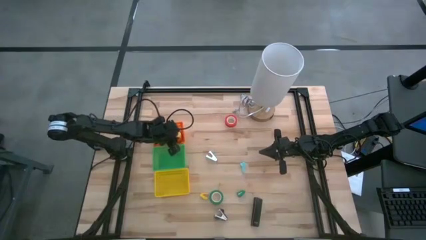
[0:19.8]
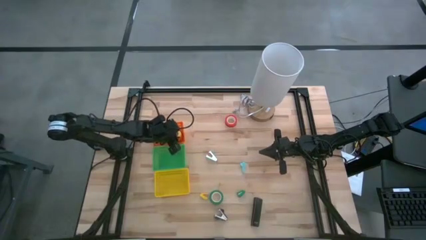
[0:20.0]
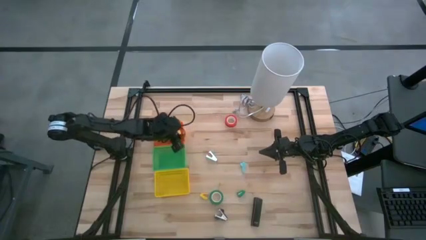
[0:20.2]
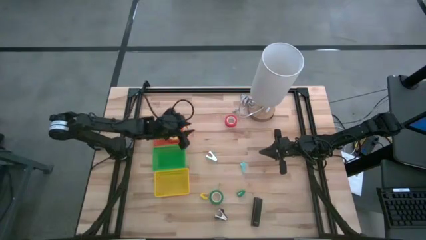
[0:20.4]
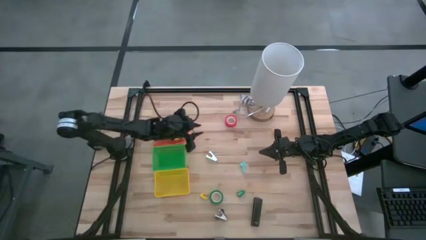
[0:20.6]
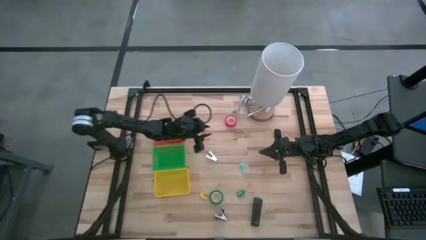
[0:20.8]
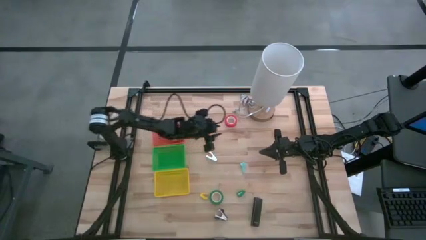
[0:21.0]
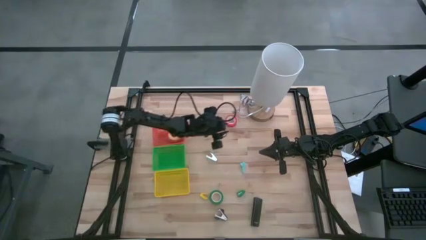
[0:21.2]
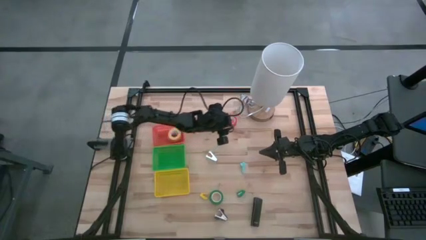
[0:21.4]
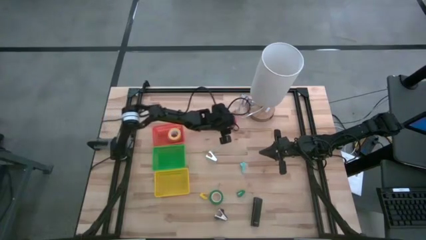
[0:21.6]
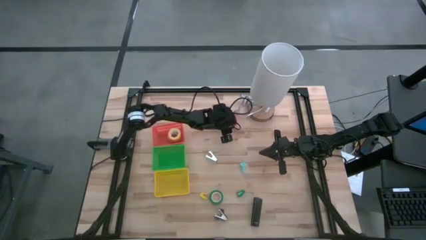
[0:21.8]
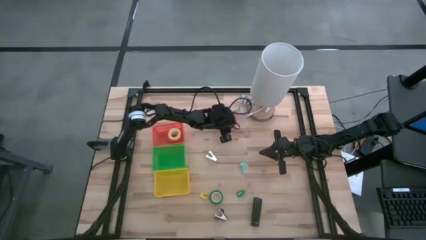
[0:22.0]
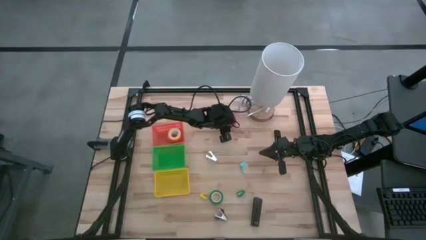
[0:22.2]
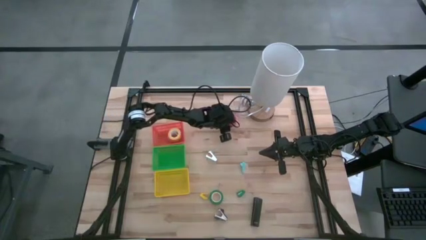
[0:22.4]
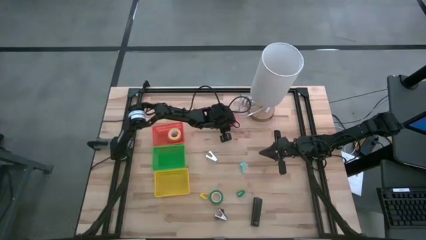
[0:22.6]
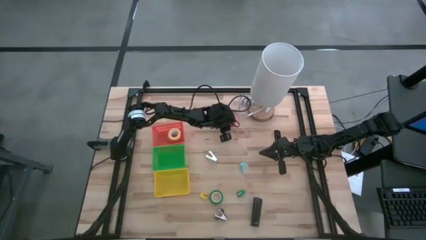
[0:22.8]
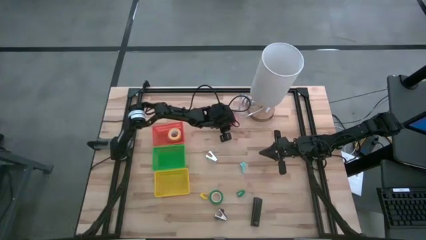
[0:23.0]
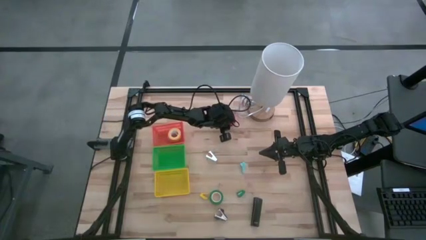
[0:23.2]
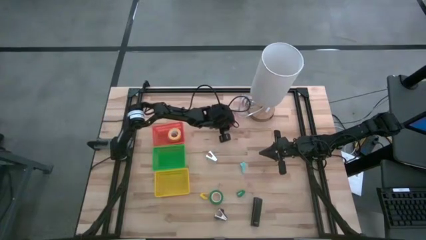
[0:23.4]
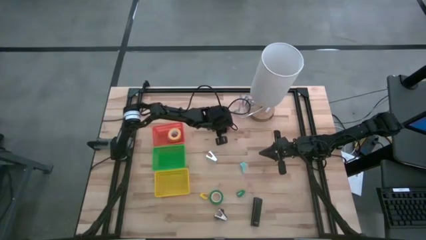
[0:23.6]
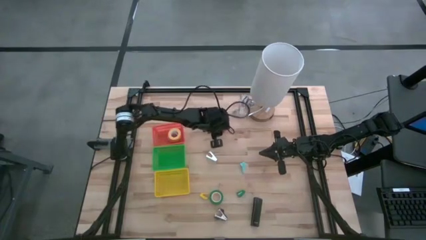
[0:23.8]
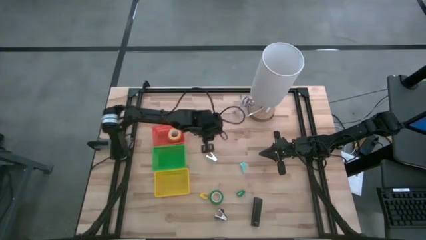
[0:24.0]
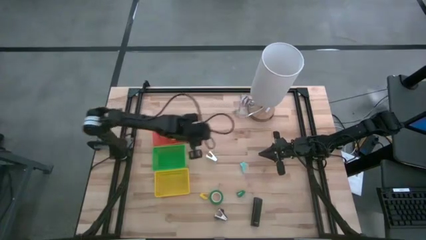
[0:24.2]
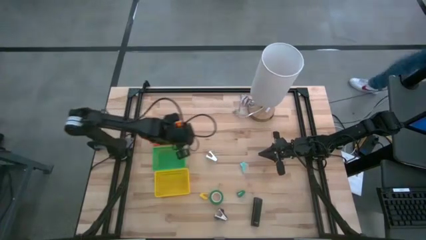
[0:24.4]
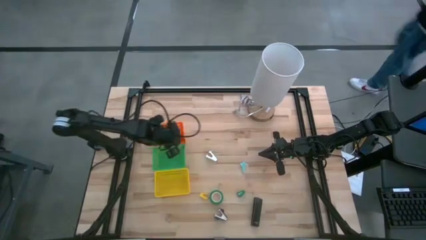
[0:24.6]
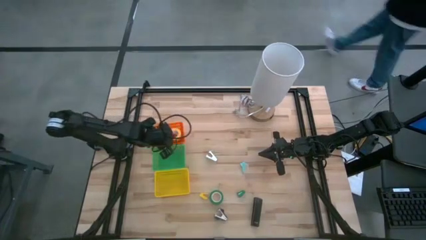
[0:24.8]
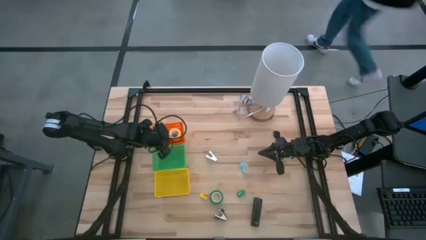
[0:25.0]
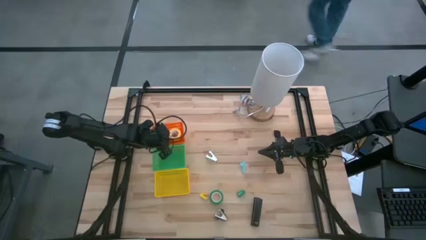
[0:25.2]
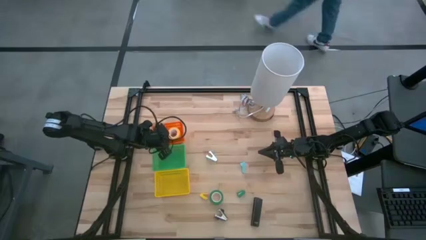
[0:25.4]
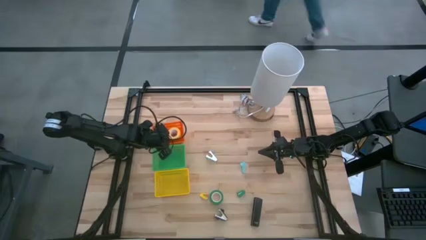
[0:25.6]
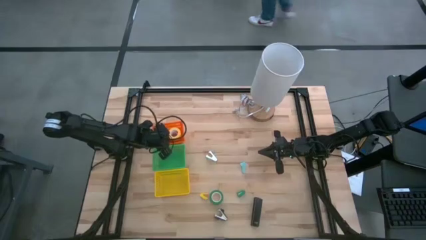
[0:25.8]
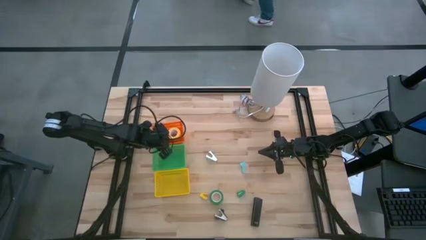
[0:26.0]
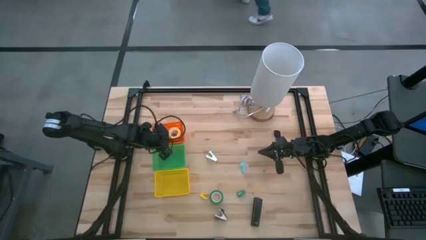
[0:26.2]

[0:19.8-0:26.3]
Task: Pick and place Stapler, Stapler remover, tape
Put the red tape into the orange basket

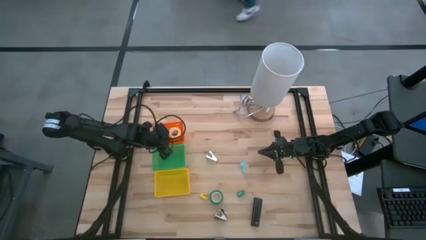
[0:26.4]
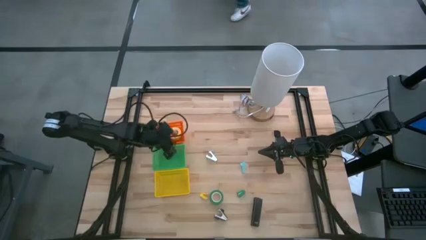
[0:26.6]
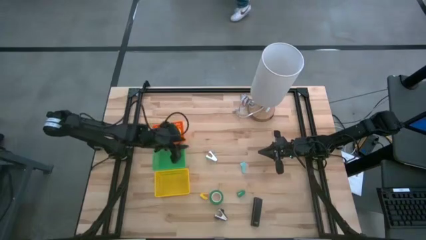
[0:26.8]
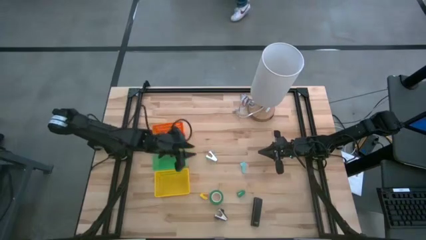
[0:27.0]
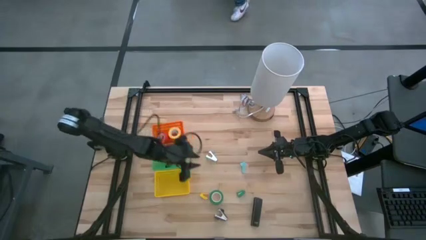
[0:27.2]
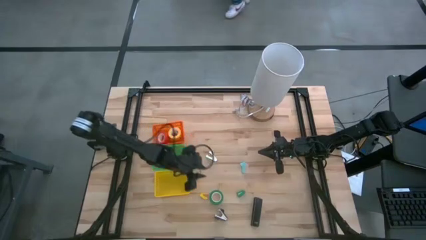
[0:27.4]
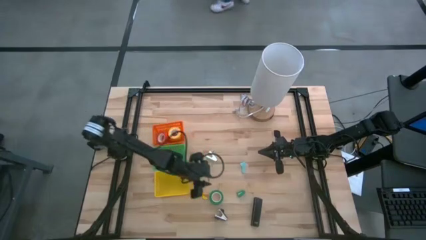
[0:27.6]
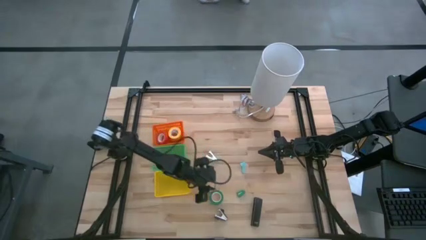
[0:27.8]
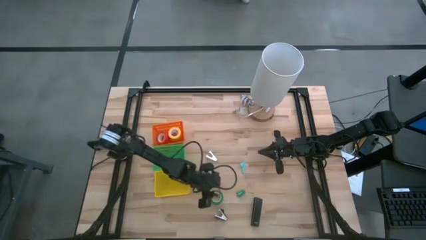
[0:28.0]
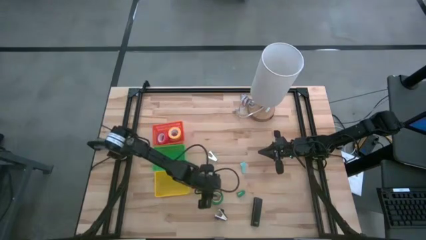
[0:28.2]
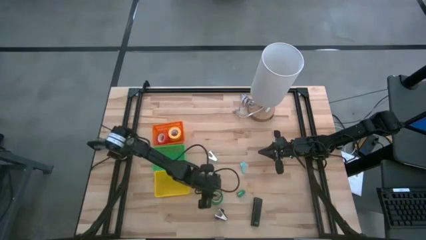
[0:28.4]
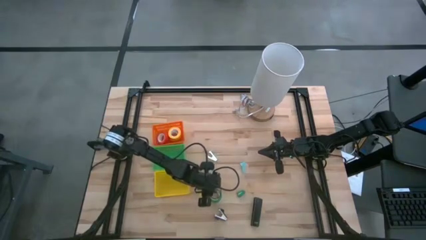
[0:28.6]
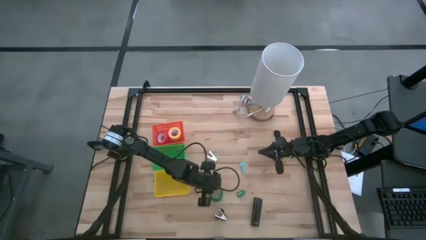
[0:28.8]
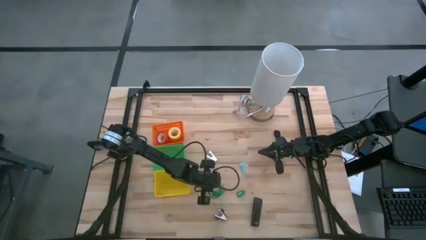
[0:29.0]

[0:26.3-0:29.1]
Put the green tape into the orange basket

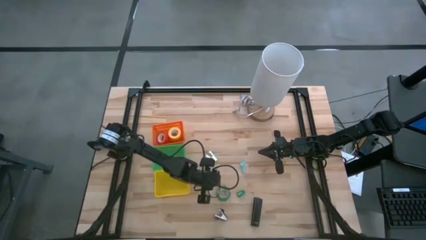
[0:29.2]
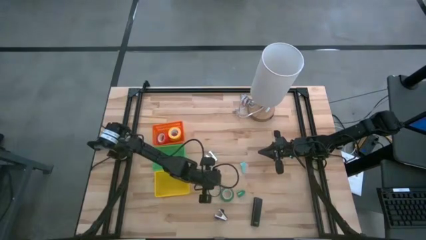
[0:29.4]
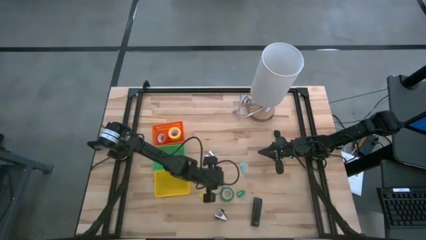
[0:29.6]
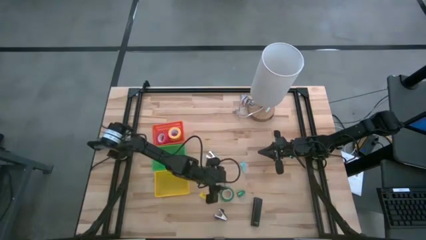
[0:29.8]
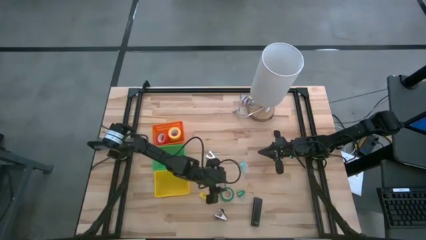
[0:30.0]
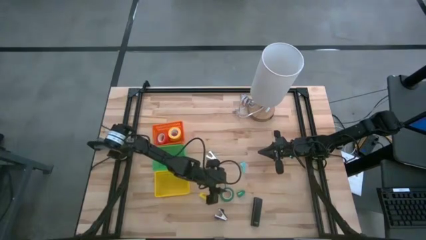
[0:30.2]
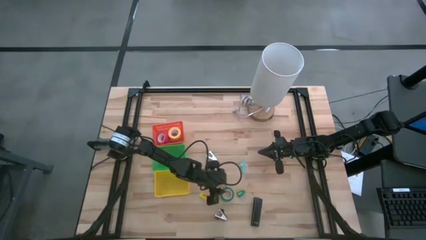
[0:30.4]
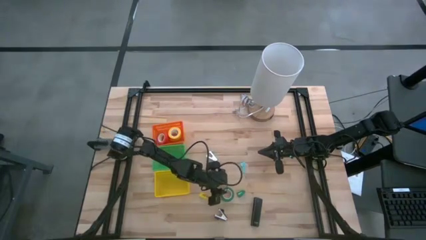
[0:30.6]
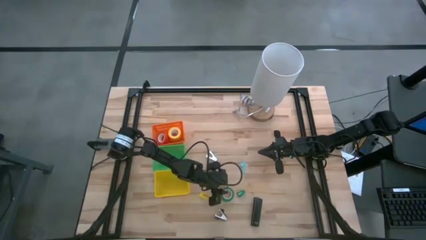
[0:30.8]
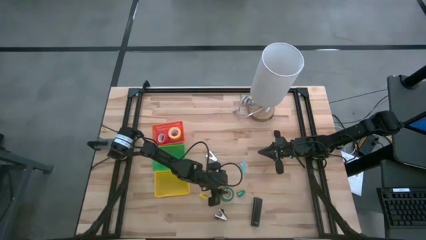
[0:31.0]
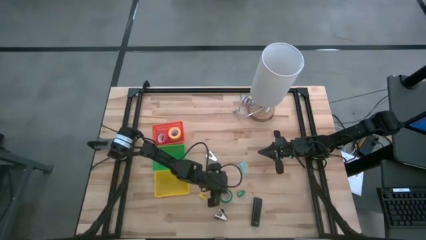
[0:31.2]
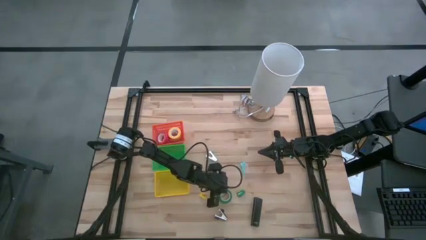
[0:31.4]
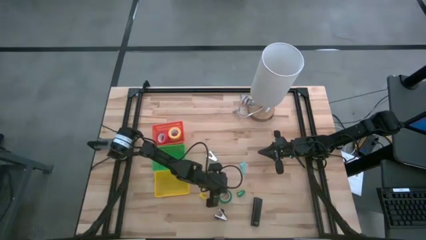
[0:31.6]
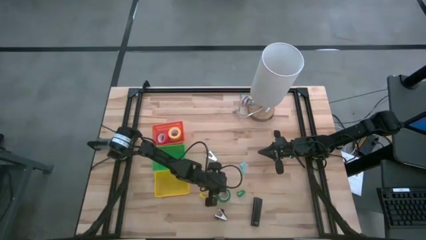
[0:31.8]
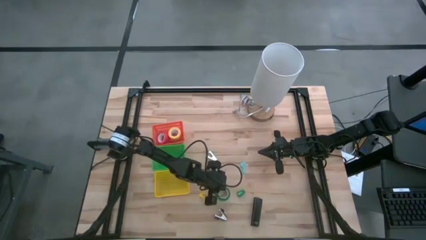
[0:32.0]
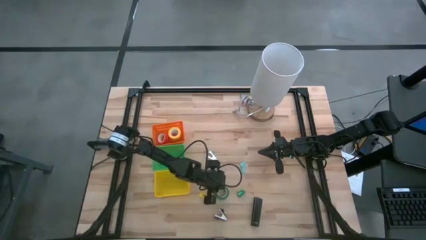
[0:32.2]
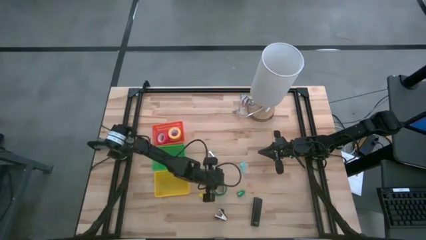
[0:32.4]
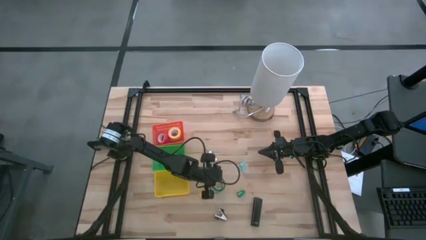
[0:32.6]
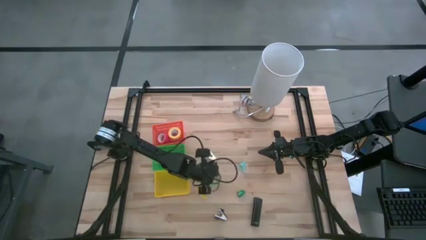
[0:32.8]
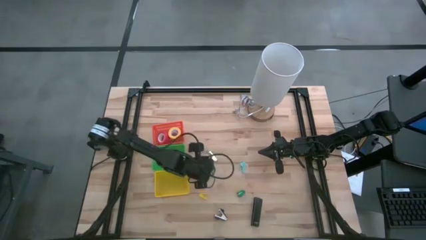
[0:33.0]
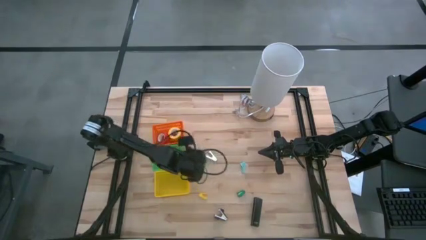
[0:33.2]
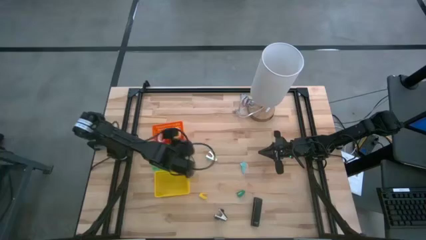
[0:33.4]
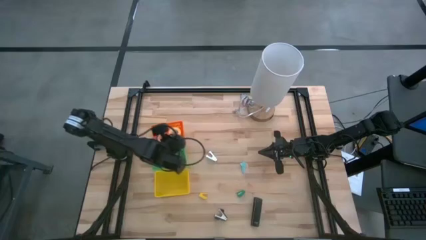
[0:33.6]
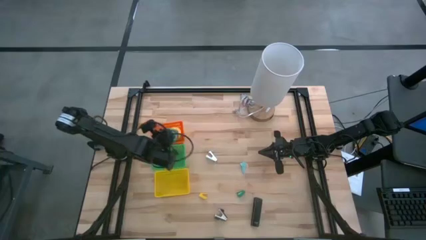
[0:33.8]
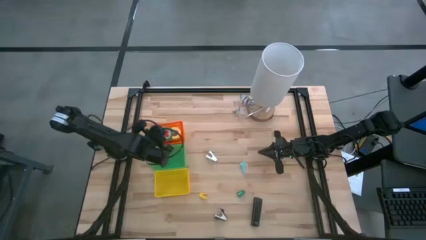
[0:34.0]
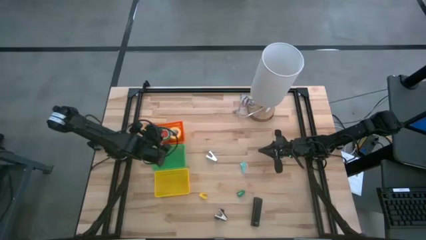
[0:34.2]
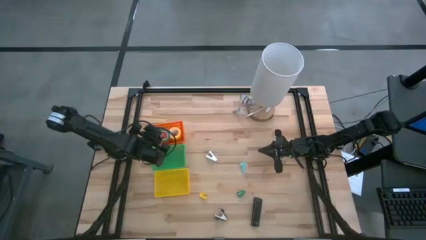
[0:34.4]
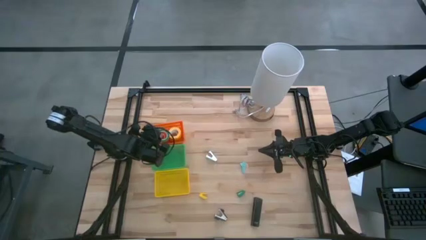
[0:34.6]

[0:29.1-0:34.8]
Put the green tape into the orange basket

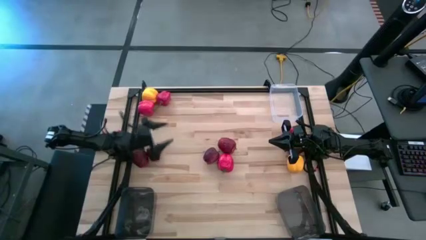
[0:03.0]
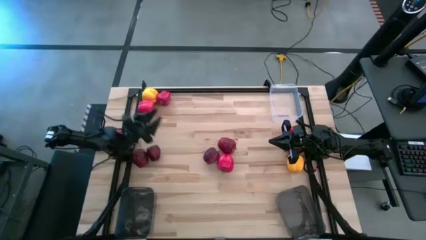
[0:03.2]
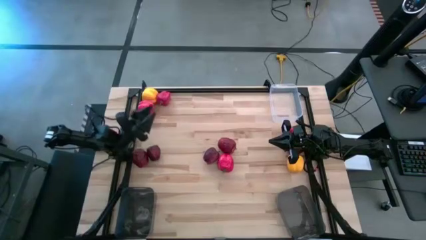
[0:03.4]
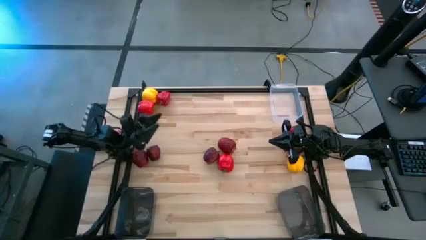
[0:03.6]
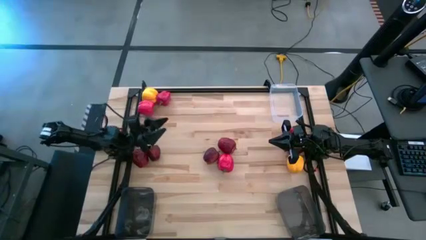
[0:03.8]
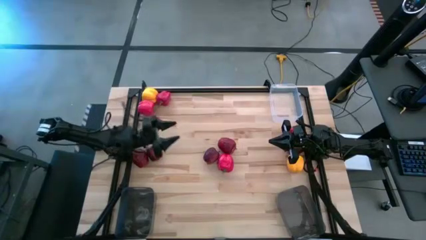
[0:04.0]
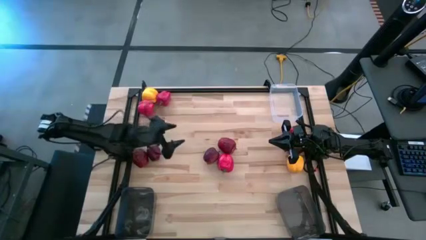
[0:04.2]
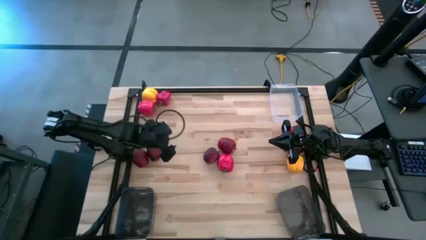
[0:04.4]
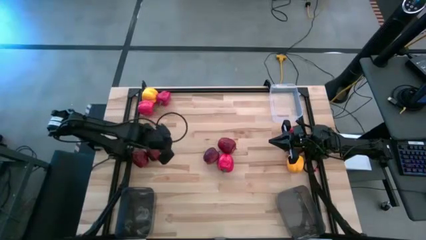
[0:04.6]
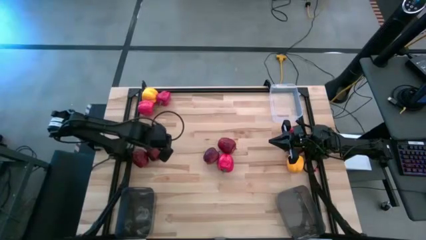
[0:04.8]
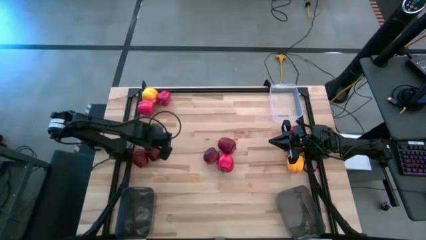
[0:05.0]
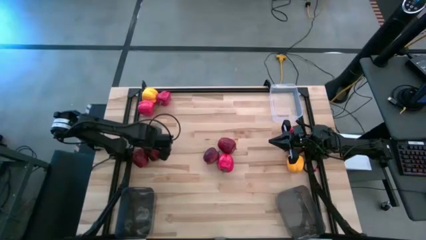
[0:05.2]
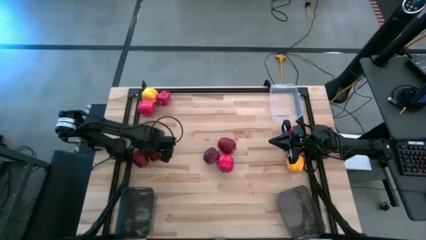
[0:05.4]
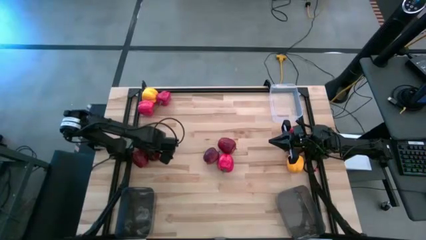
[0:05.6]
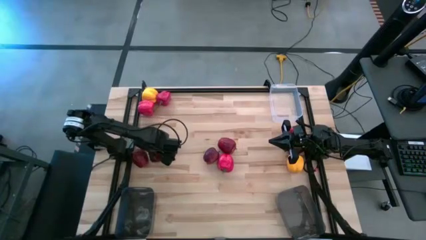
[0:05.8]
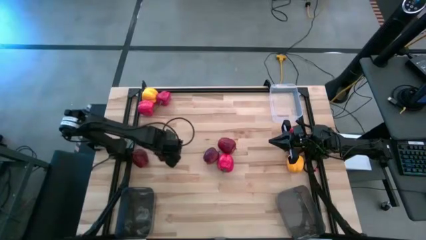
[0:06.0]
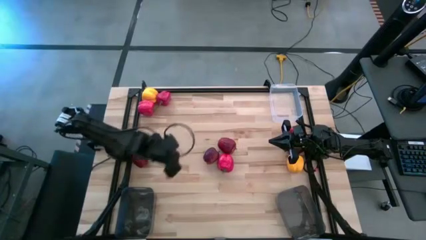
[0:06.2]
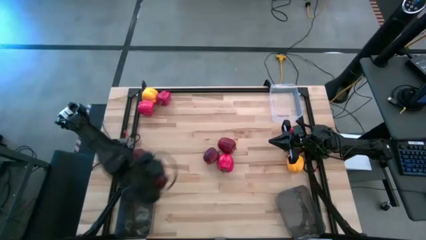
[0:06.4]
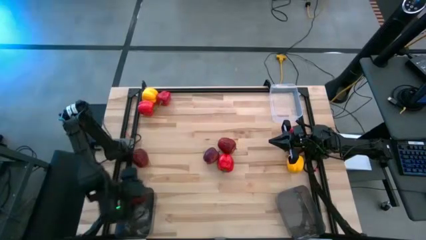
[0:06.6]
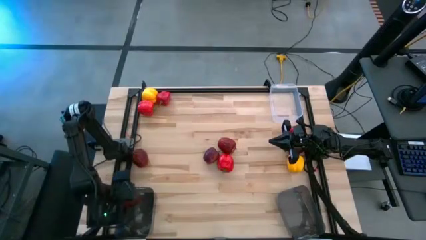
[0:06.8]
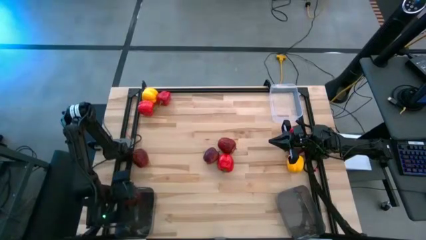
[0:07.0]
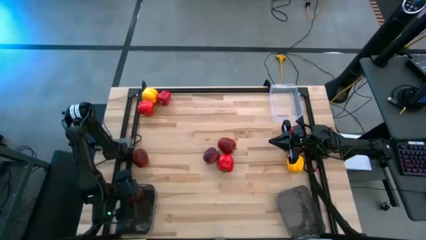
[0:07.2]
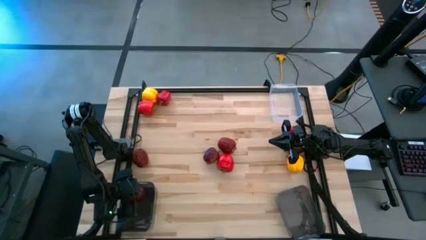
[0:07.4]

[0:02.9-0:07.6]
Task: Sort produce into baskets
Put the dark red apple into the left black bin
